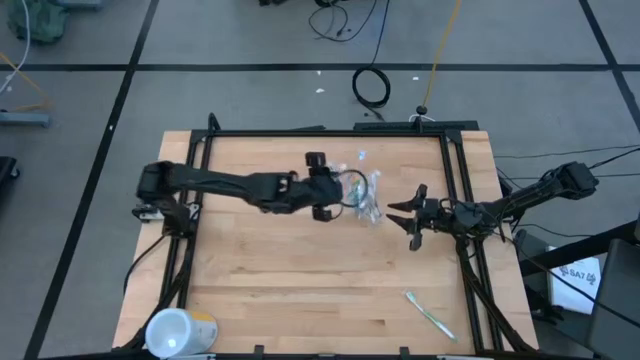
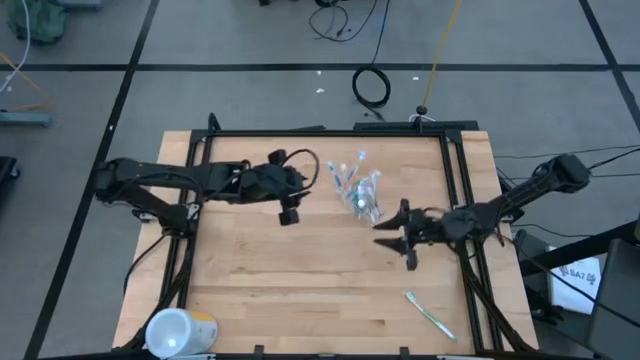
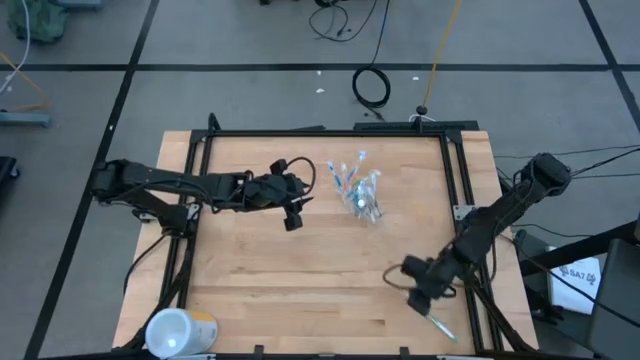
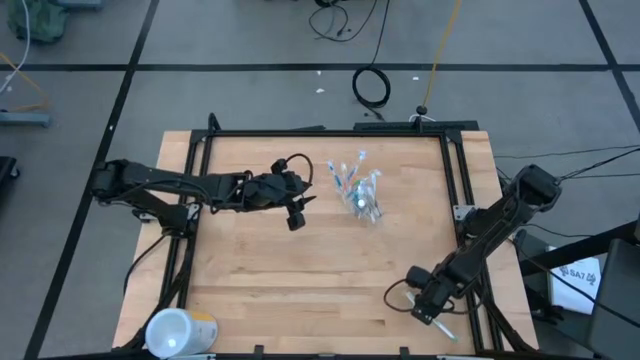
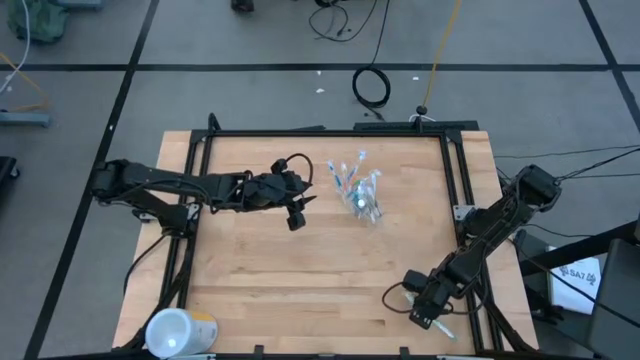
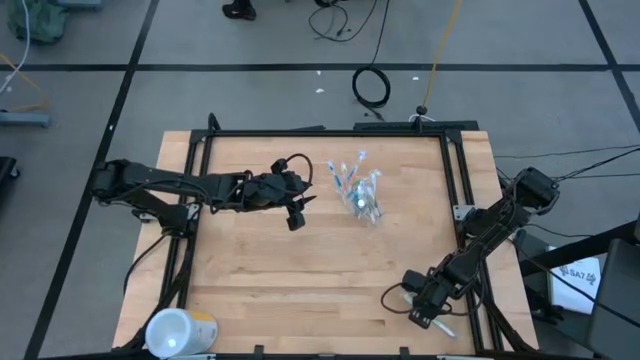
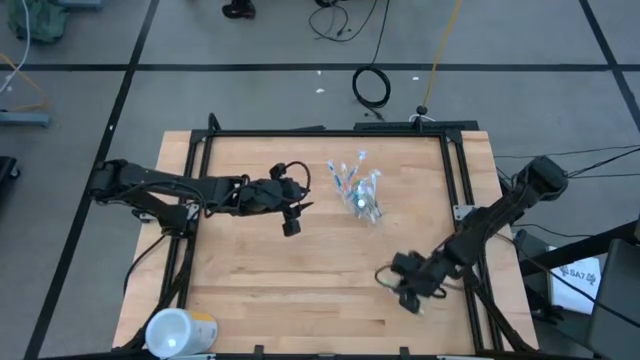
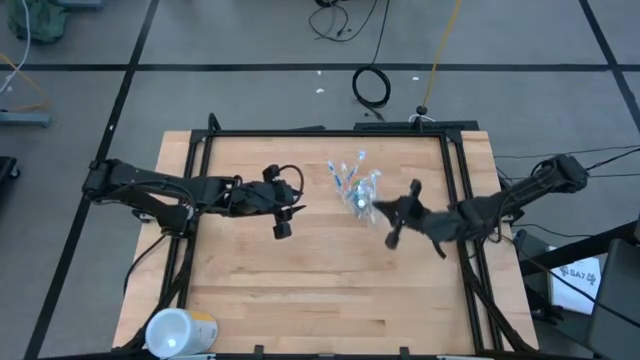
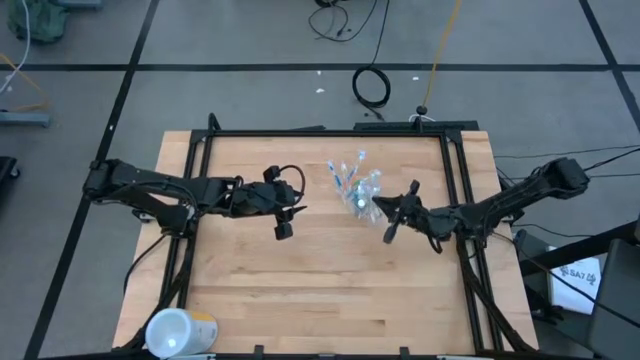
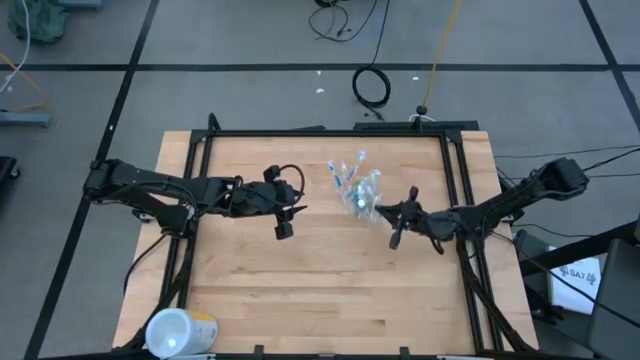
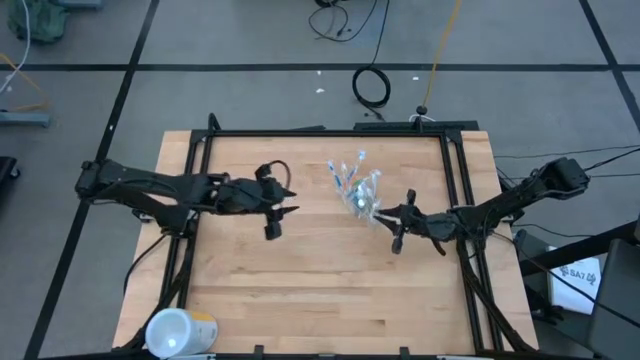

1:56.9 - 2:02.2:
Task: Pick & Place toothbrushing station
Put the green toothbrush into the transparent organizer

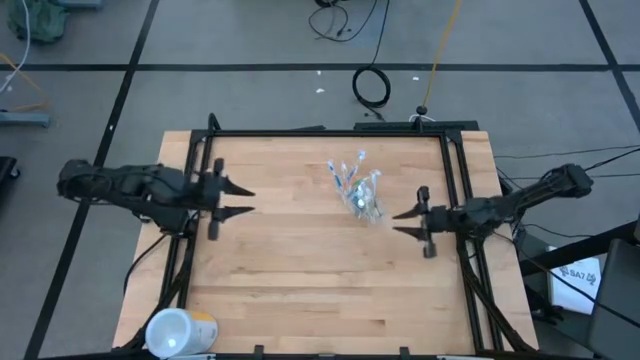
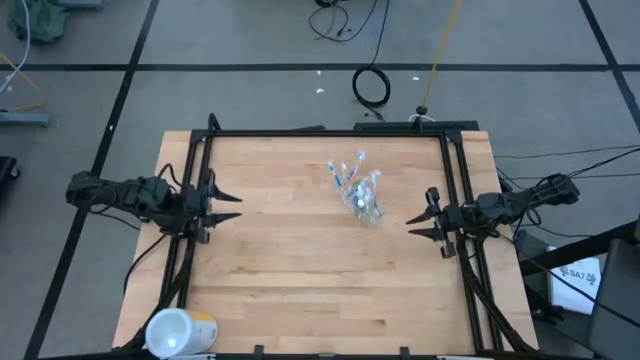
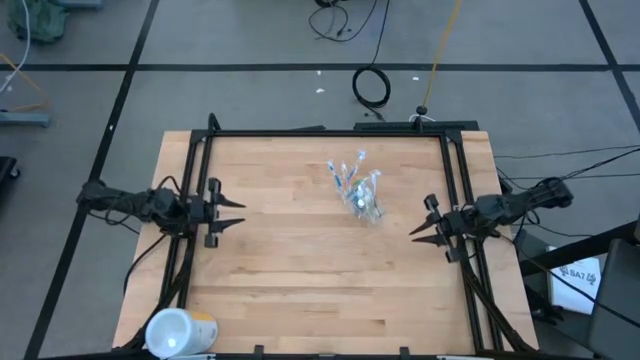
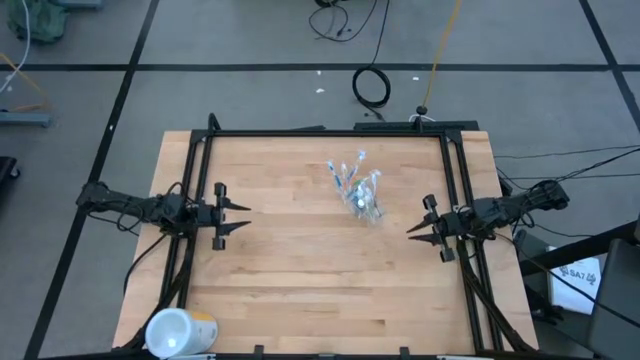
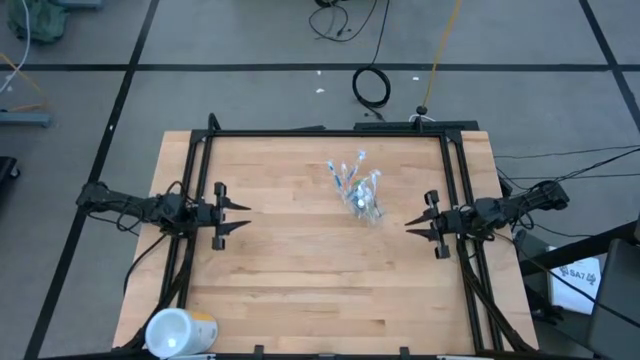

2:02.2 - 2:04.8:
Return to Home Position

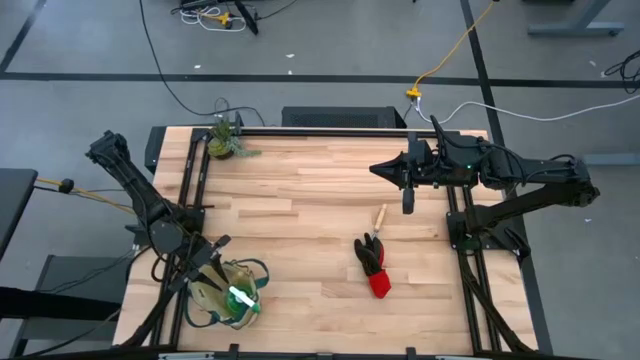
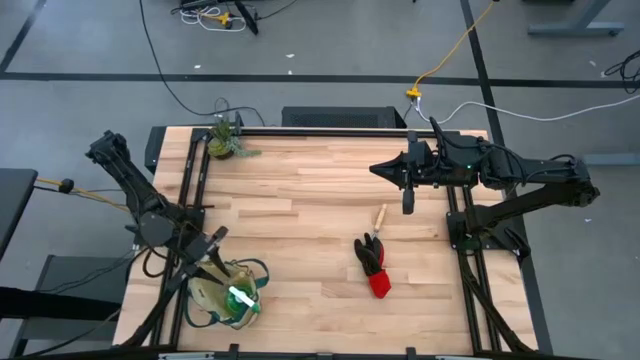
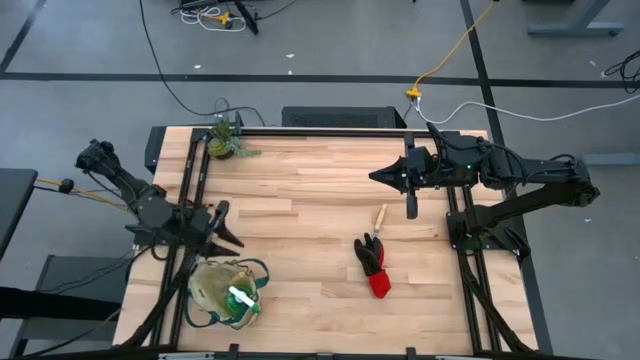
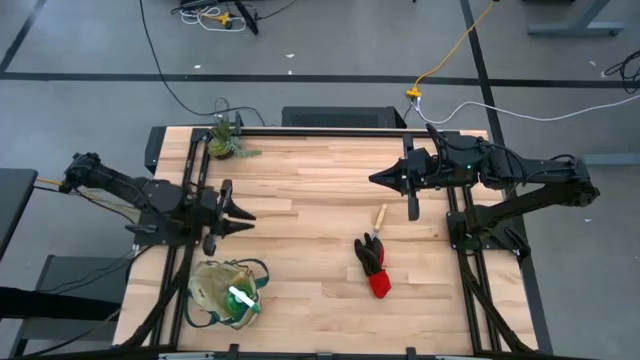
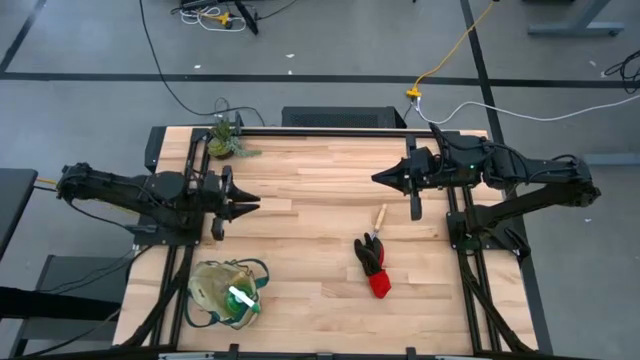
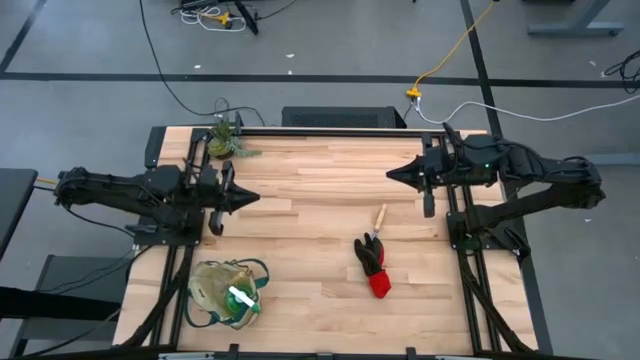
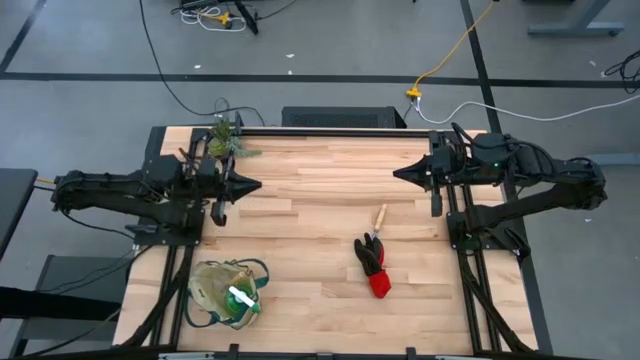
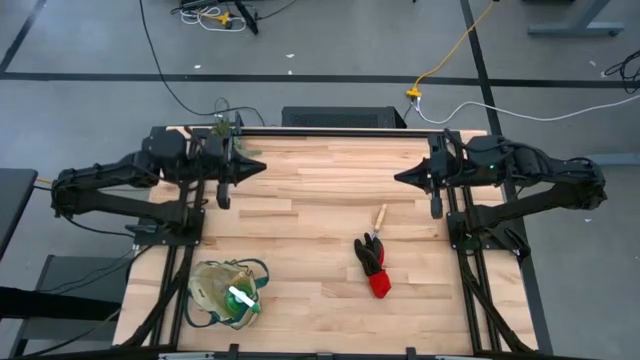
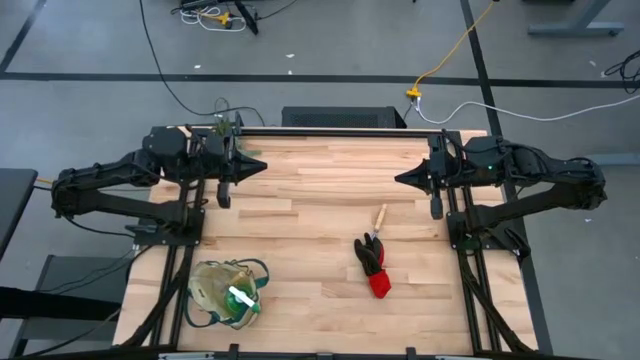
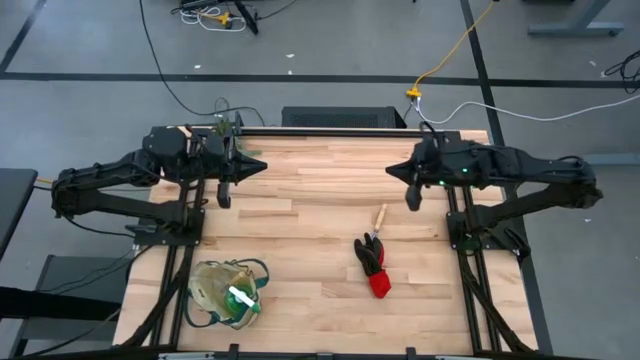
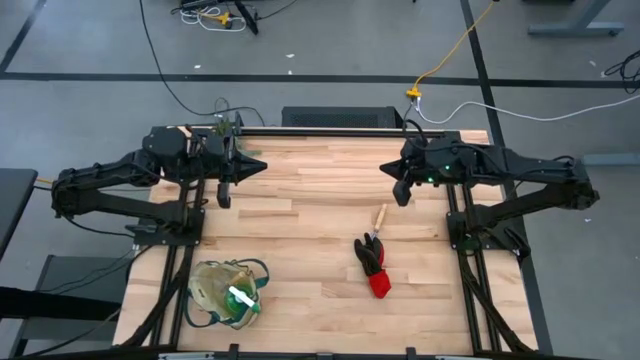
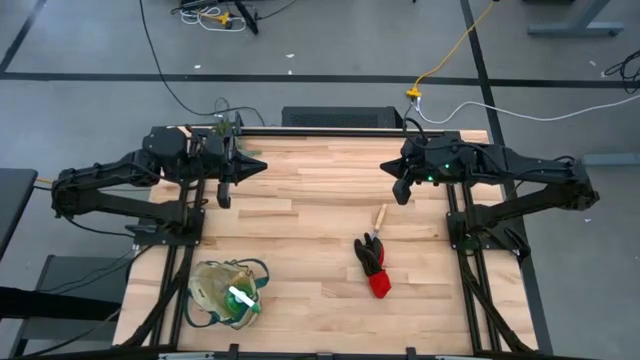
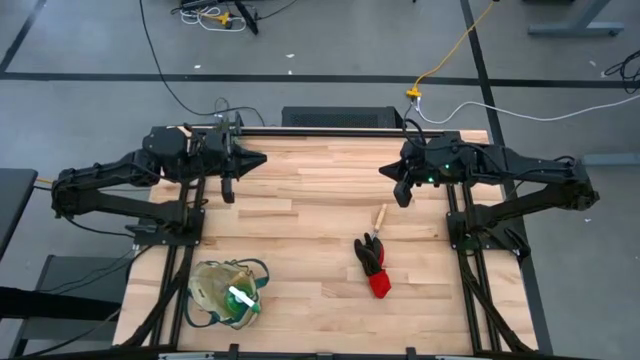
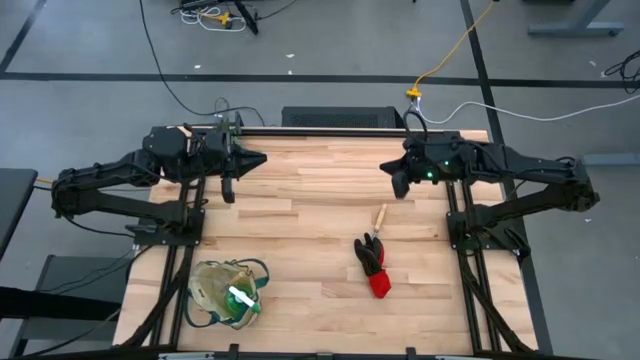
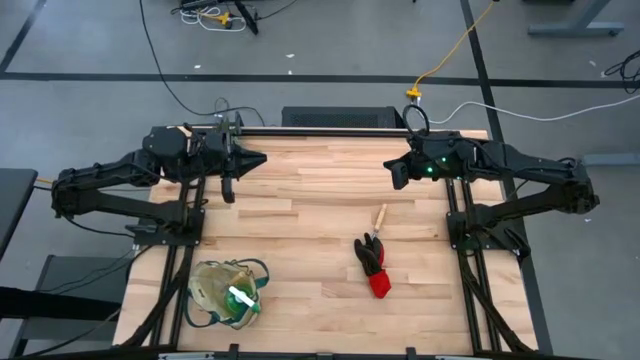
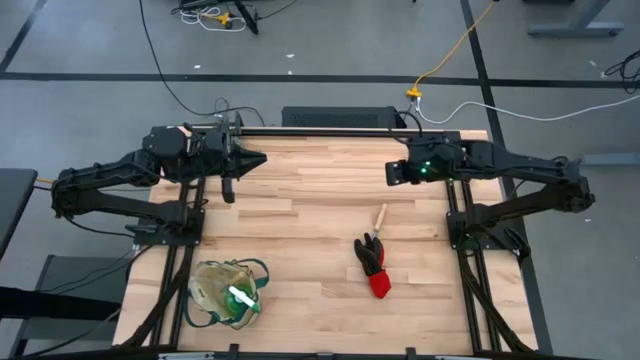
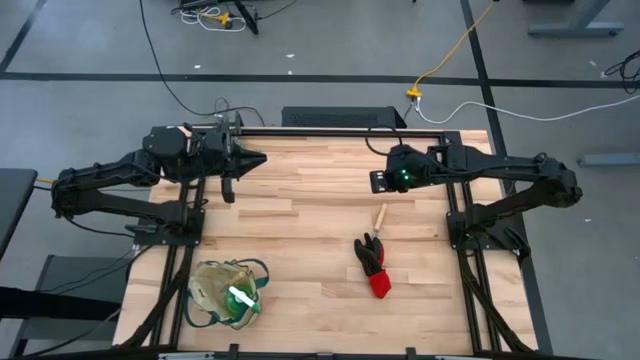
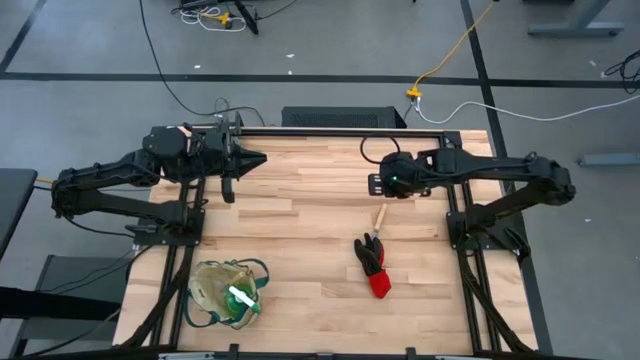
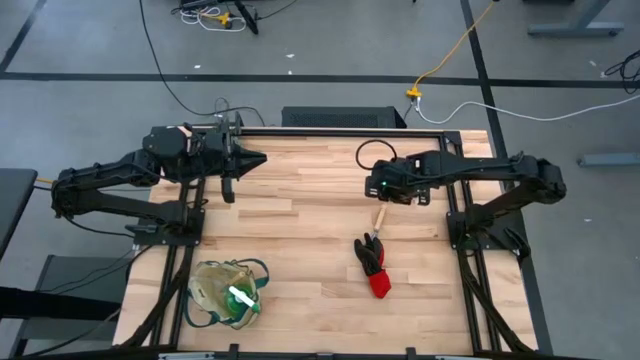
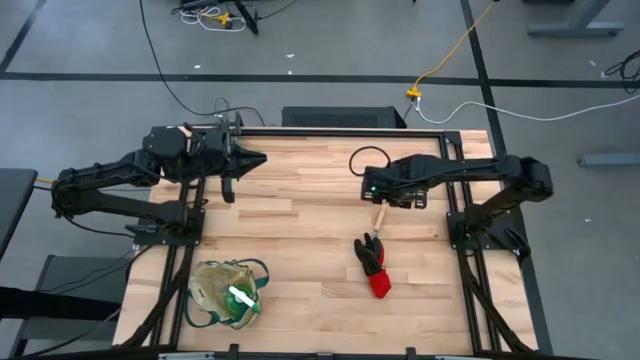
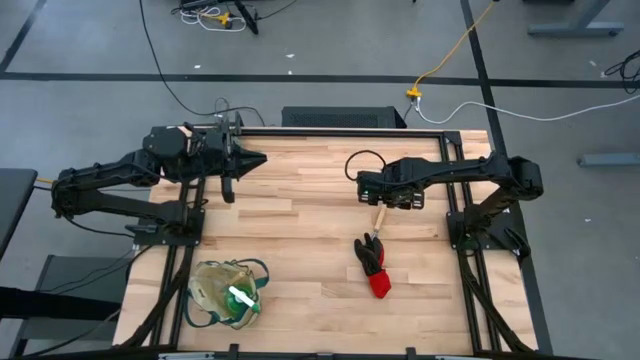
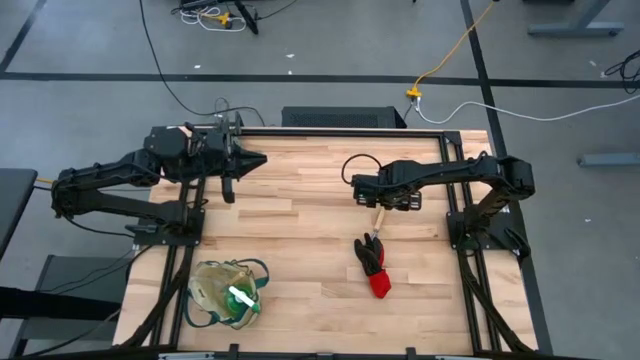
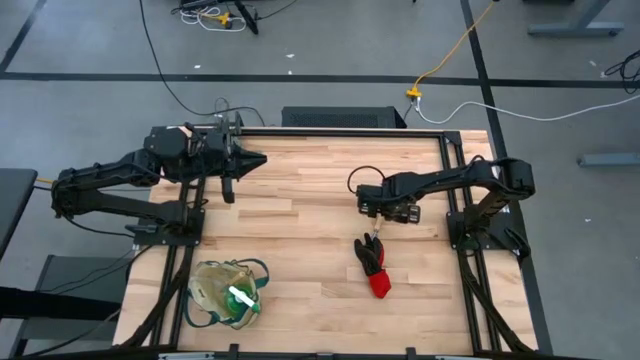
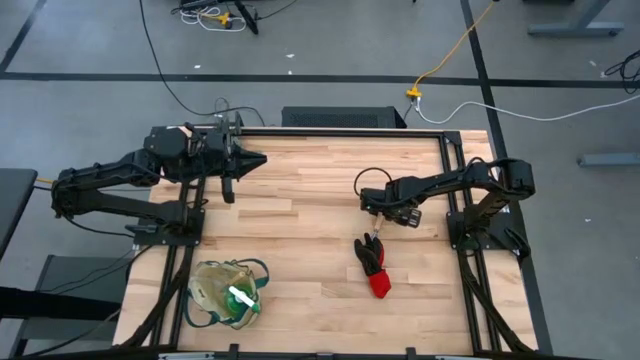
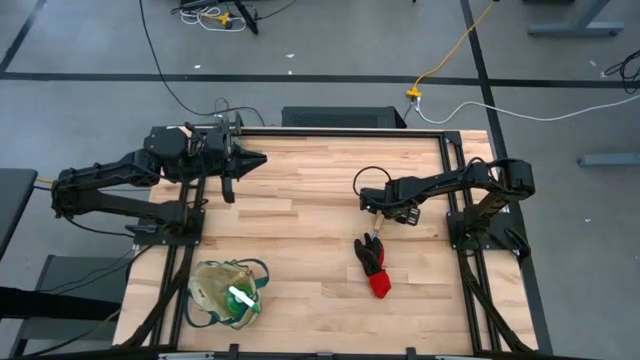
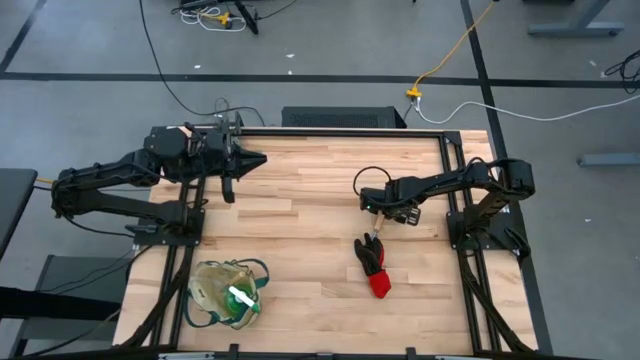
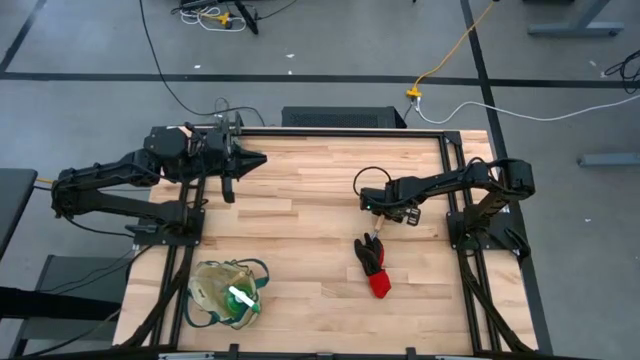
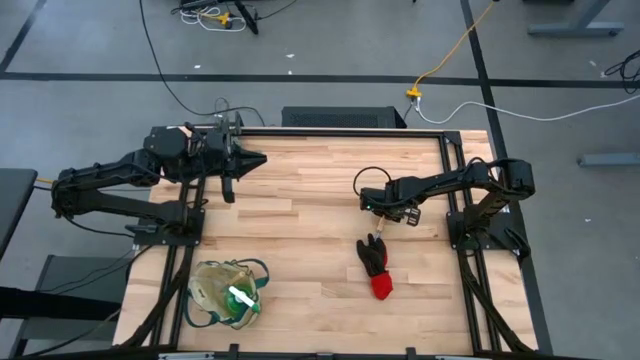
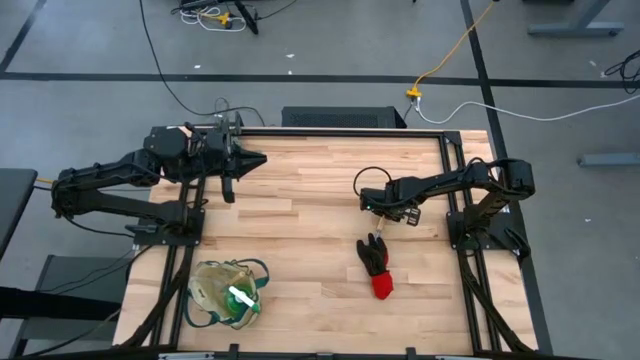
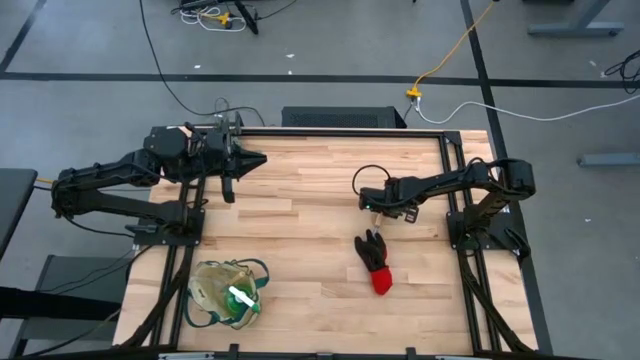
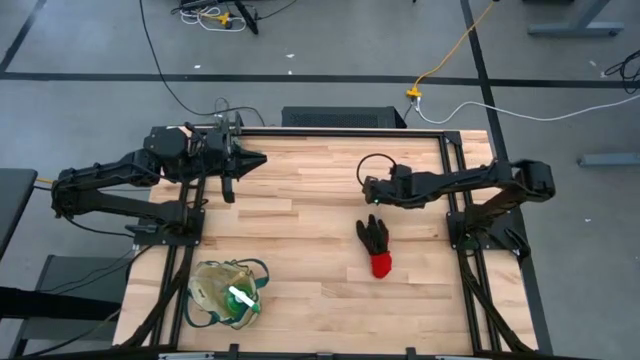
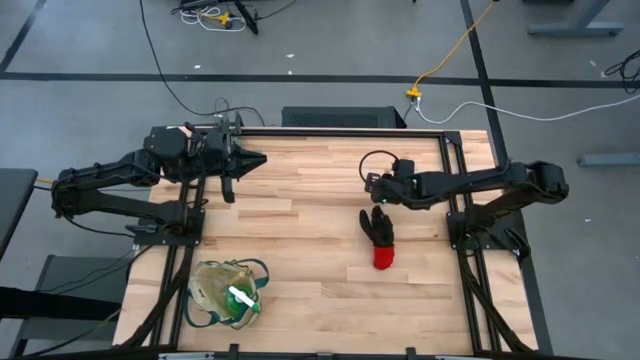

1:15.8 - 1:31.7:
Task: Pick & Place Garden tools in Gardening bag
Put the brown hand rake into the white gardening bag
